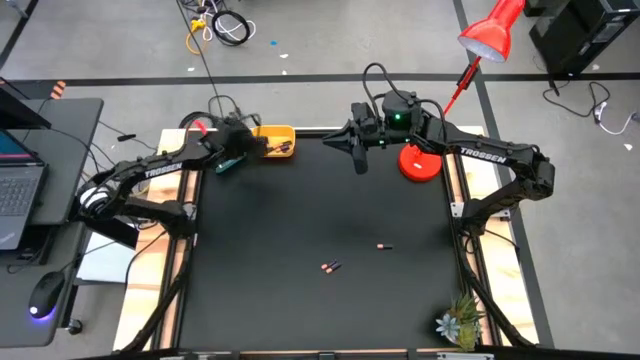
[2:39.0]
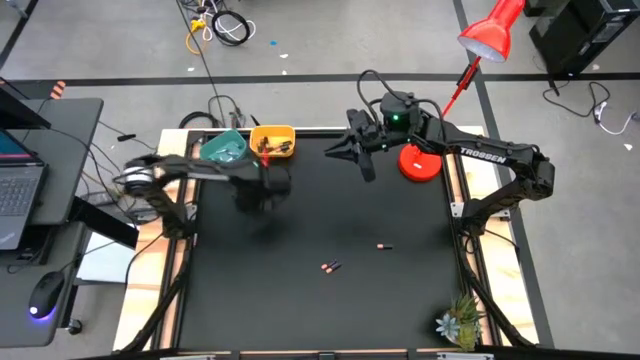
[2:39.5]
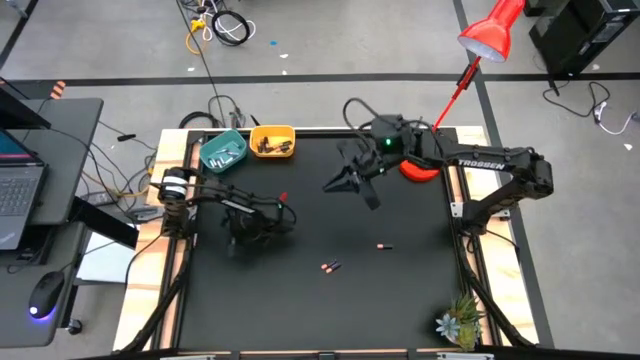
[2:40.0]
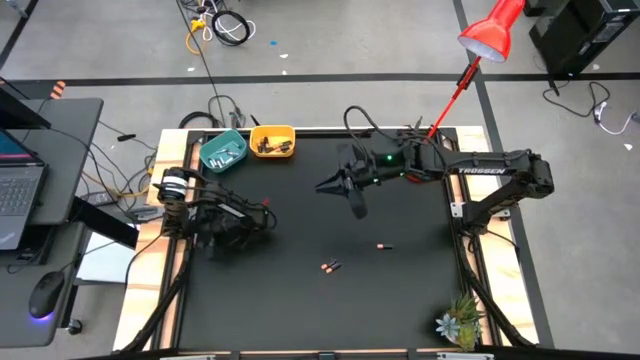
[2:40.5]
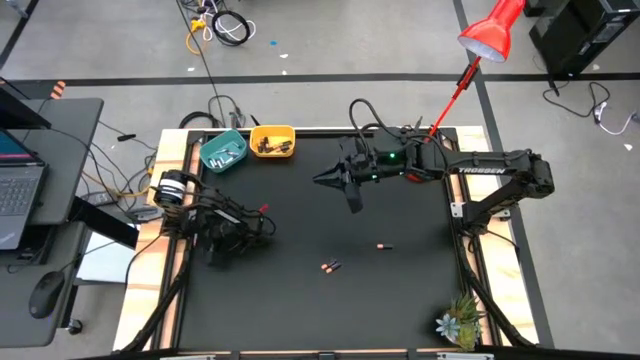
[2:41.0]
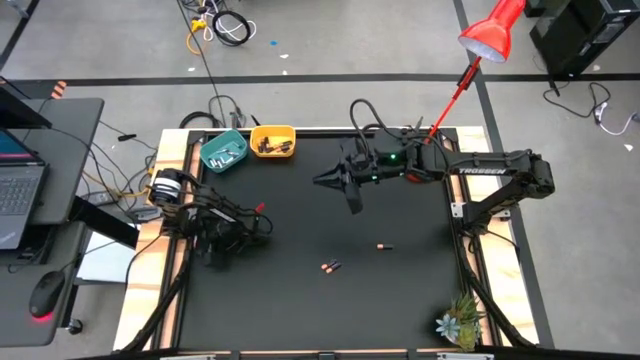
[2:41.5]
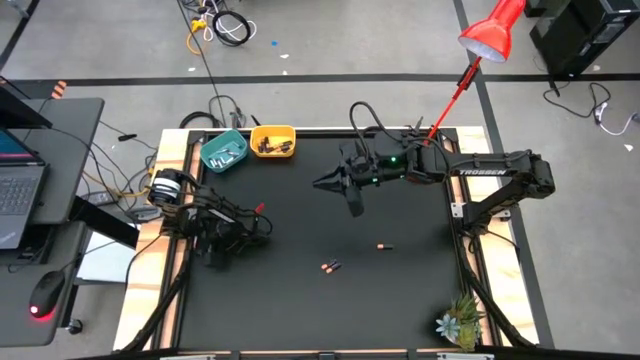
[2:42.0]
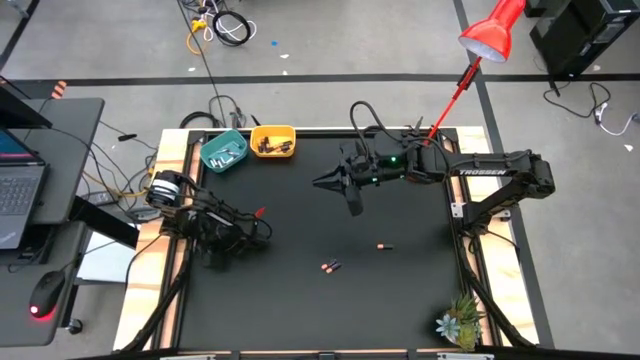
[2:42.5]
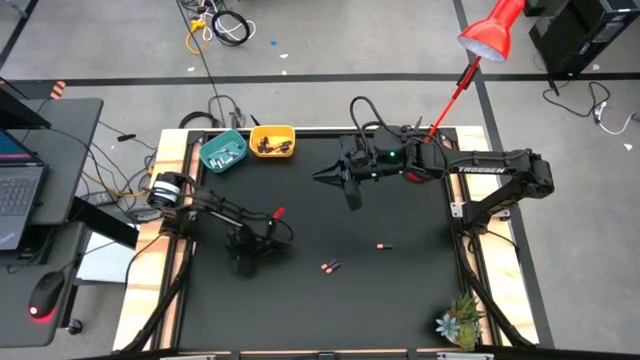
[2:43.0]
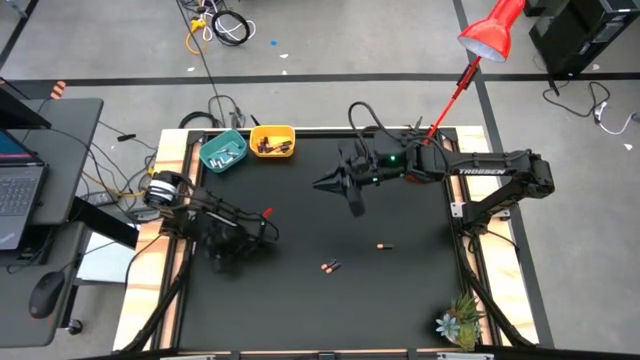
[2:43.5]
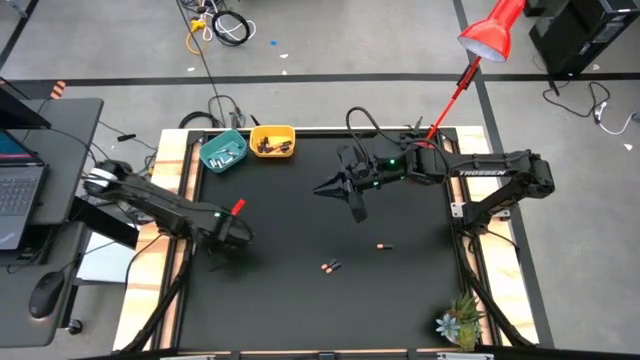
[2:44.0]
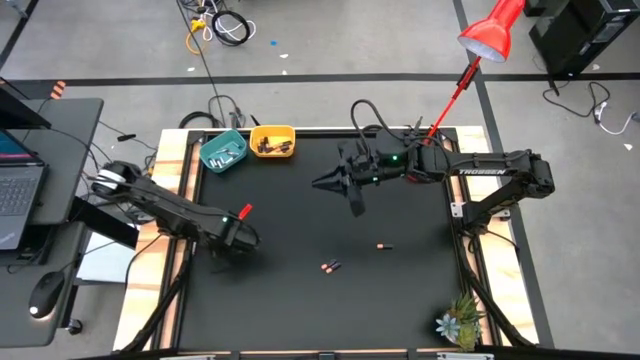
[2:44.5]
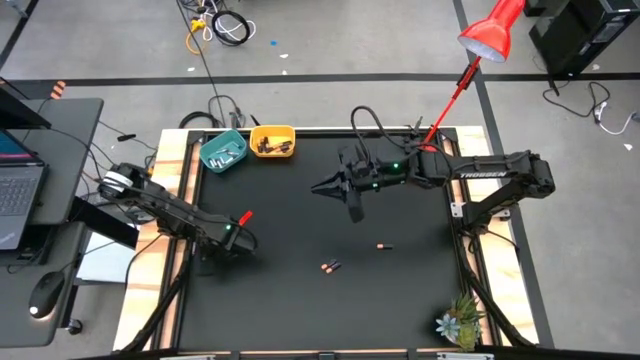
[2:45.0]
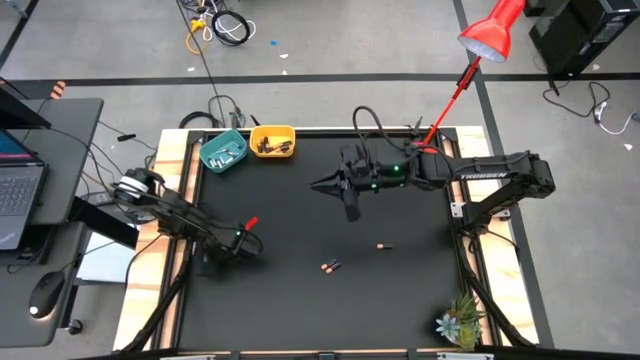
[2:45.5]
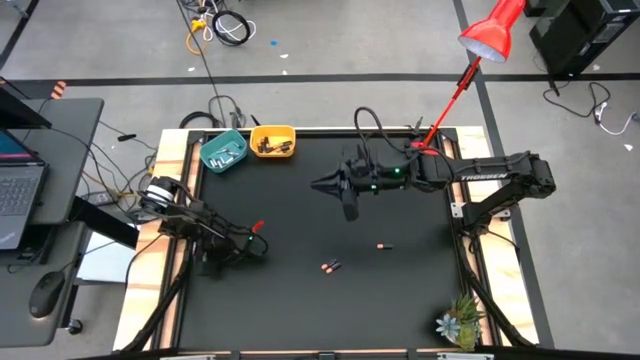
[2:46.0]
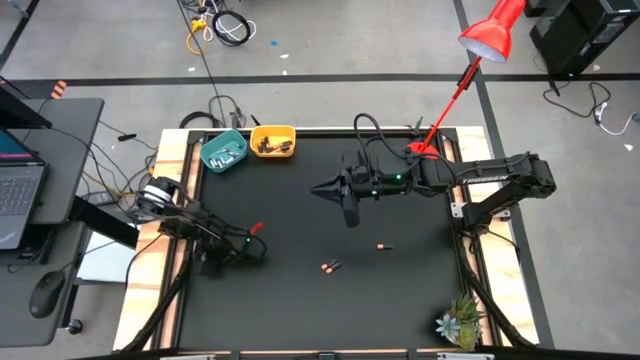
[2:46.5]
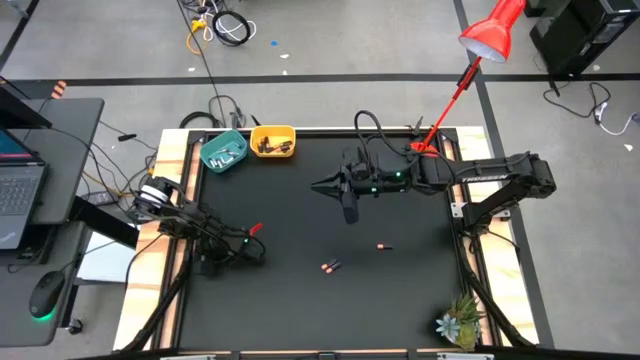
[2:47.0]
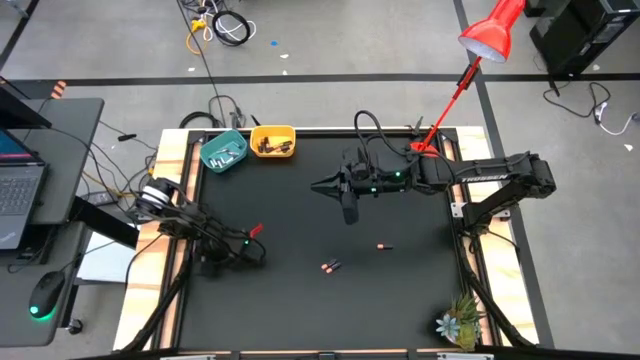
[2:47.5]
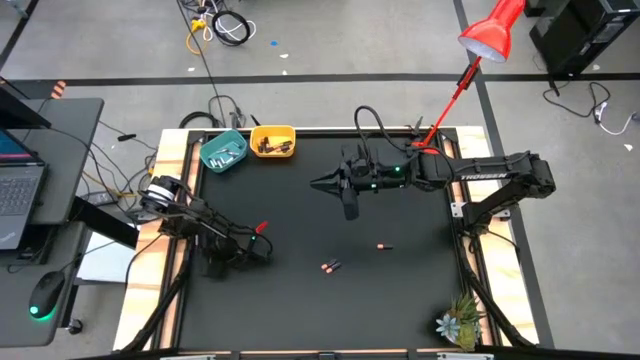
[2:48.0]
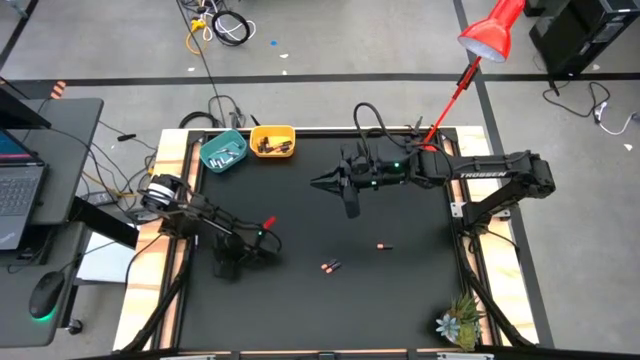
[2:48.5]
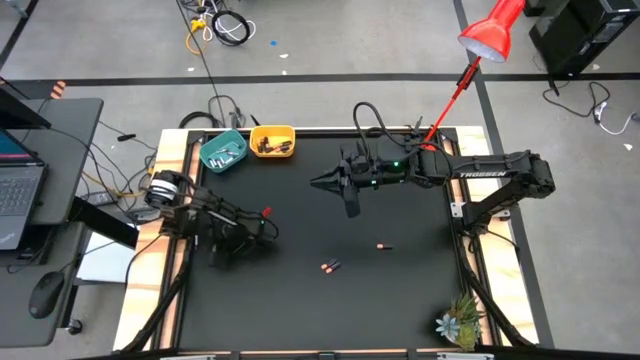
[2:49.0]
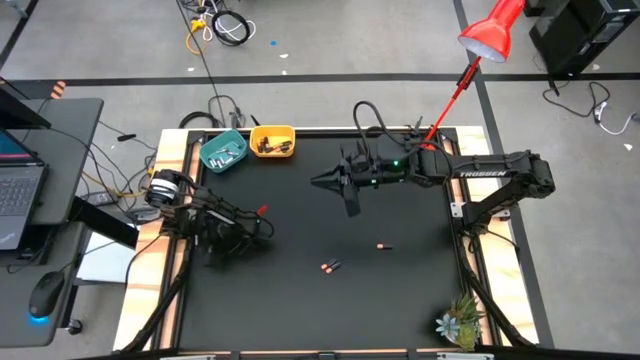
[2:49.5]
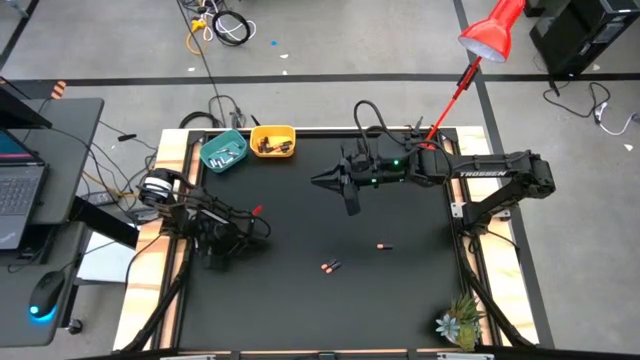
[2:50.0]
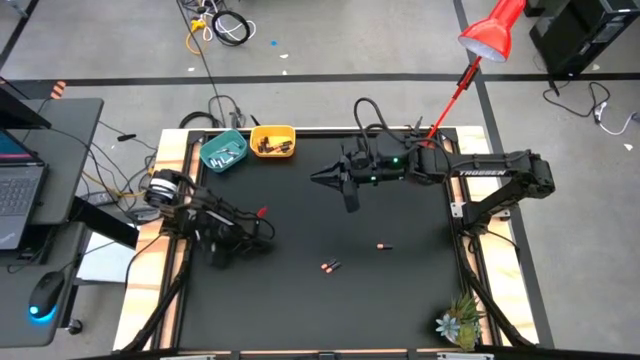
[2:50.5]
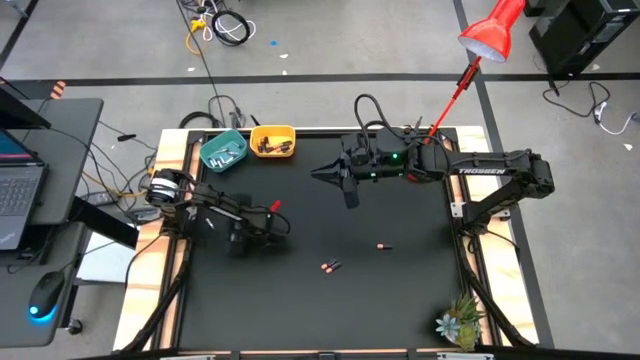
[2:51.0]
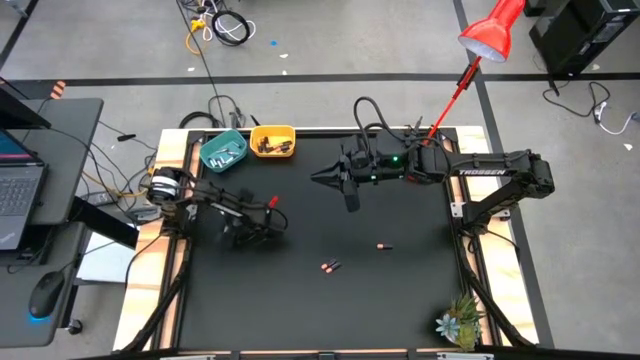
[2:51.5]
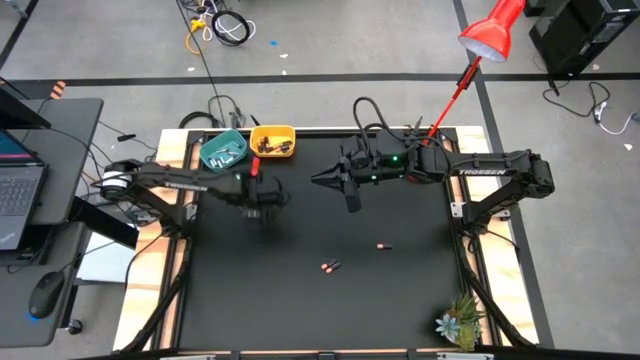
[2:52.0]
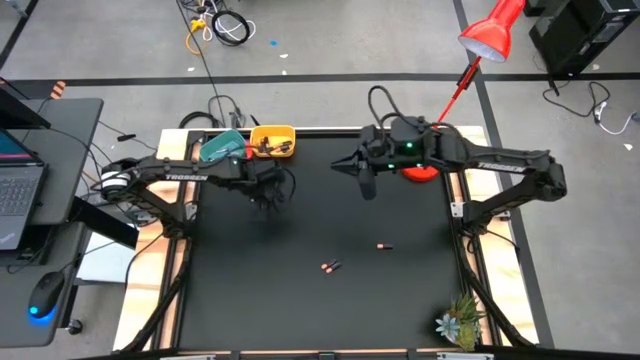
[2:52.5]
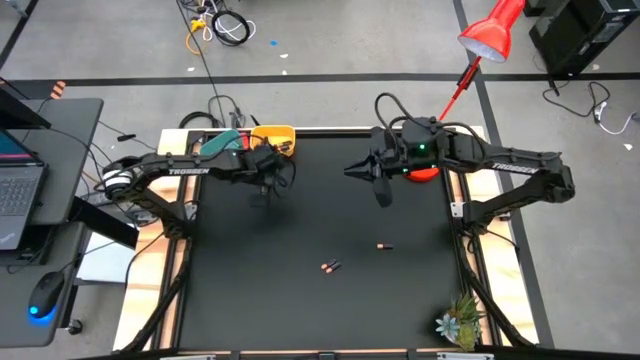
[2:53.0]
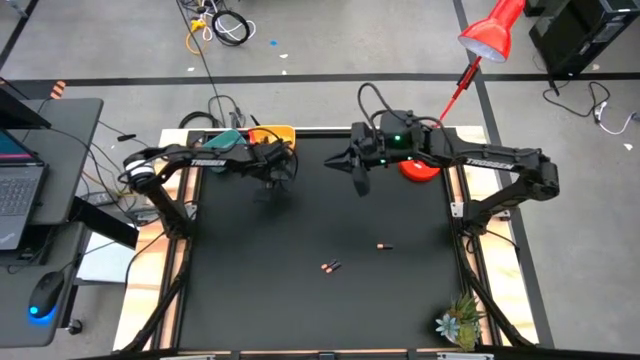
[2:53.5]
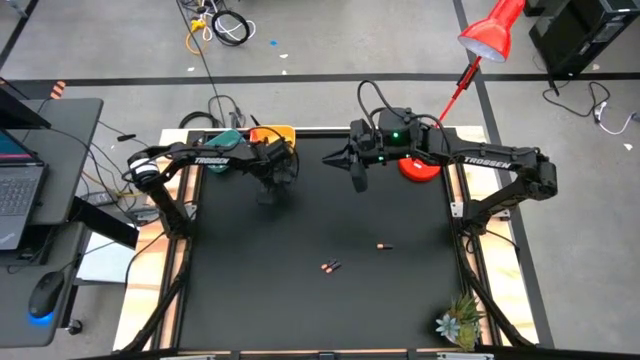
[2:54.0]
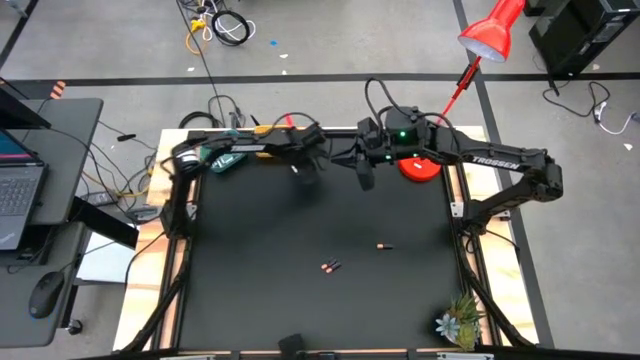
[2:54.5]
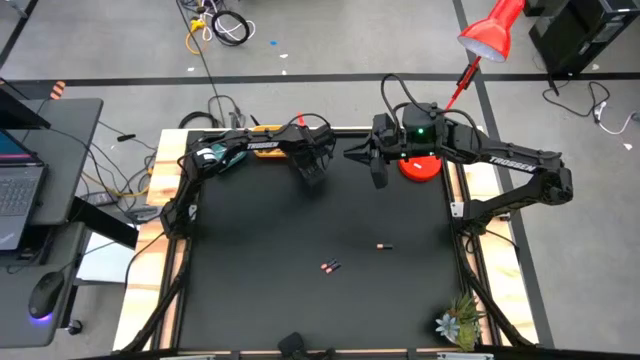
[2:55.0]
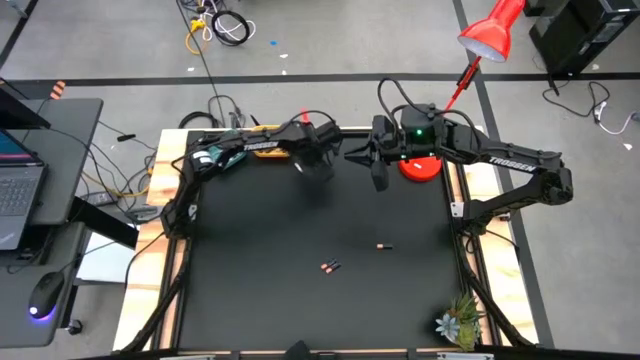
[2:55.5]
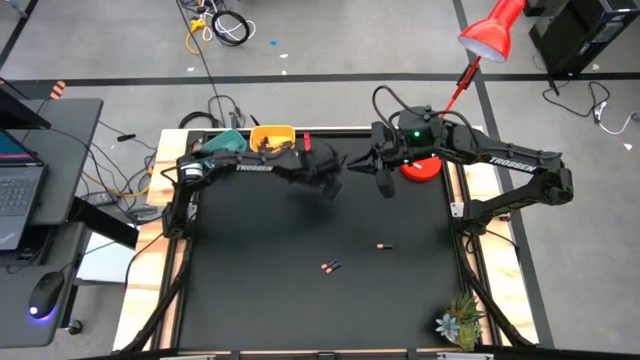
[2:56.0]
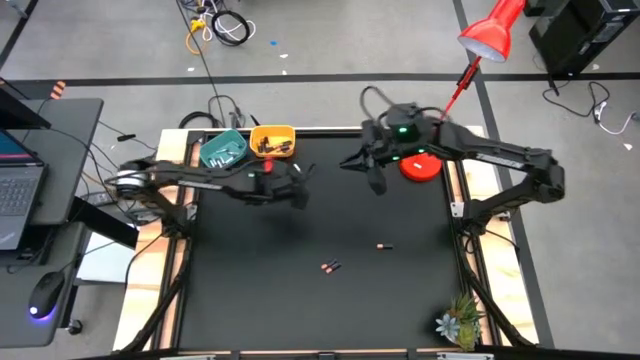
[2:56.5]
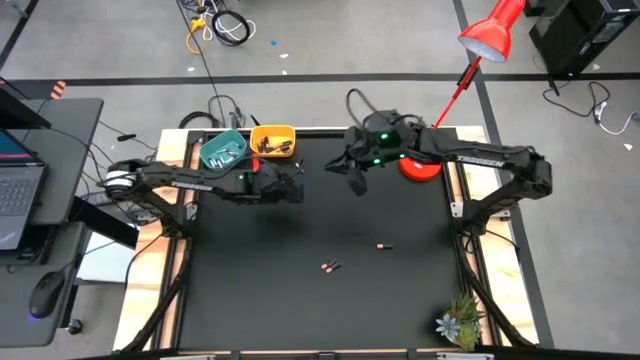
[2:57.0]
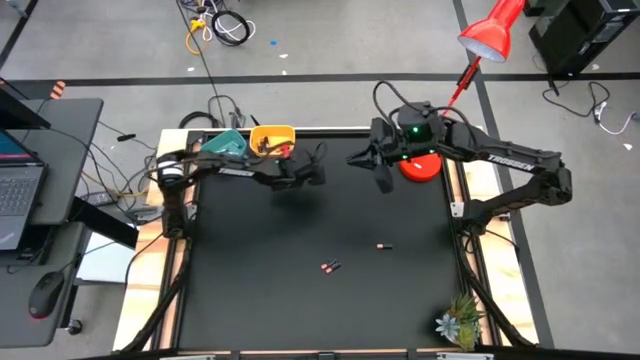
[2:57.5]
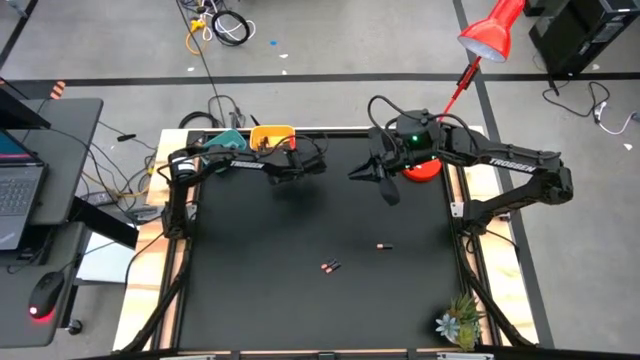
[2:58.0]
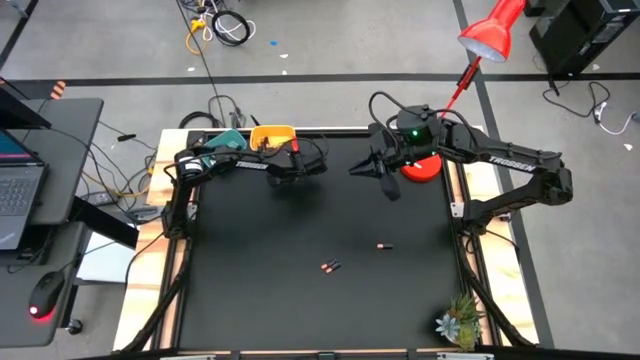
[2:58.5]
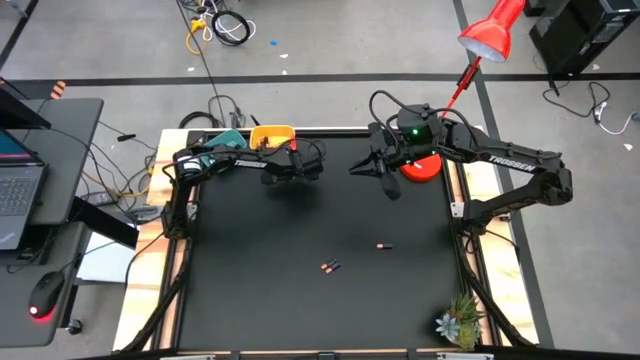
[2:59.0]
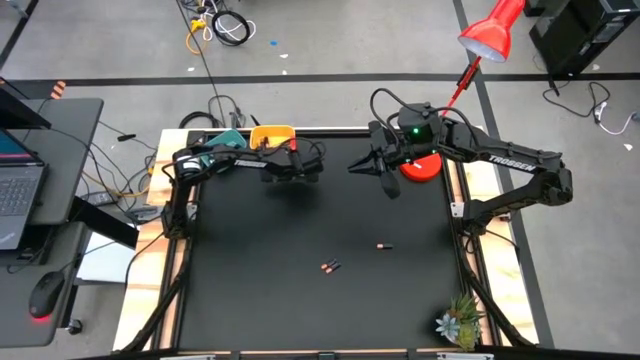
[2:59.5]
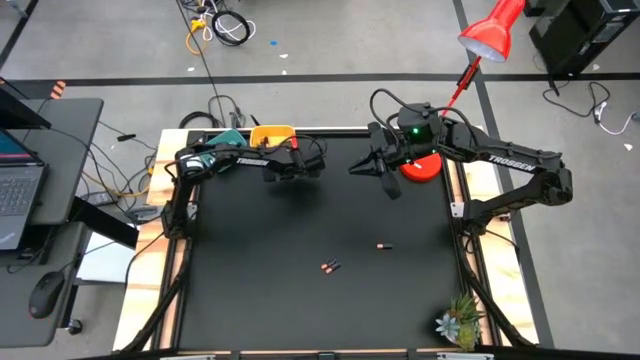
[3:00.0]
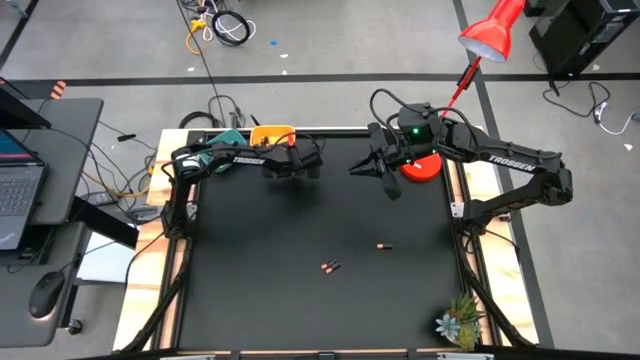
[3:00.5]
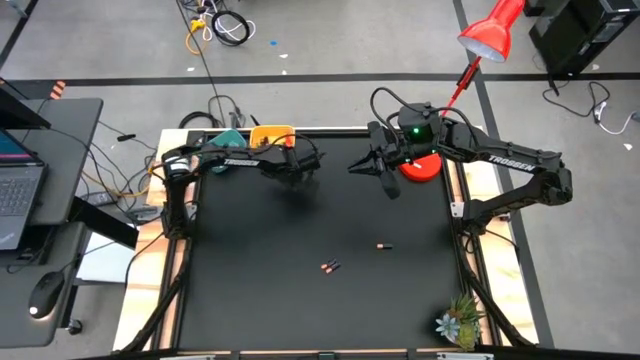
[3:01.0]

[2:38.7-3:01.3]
Task: Sort batteries
Put the silver battery into the blue bin
